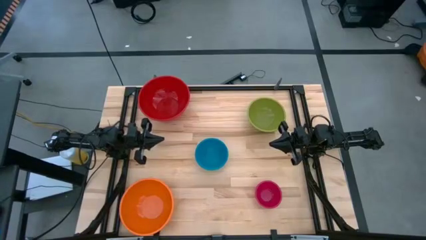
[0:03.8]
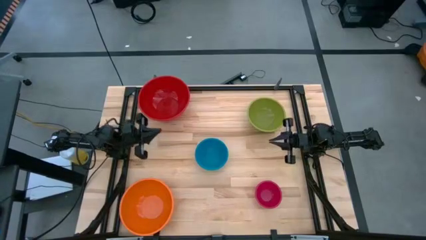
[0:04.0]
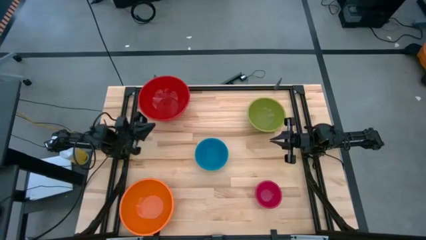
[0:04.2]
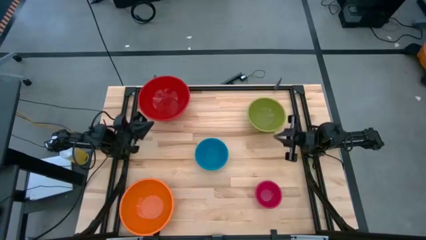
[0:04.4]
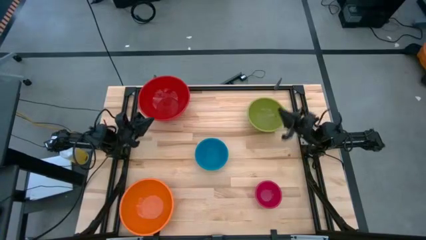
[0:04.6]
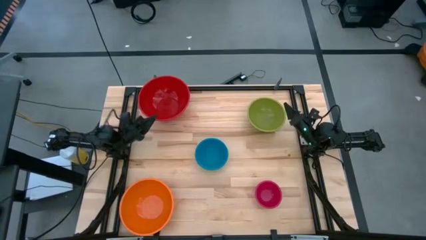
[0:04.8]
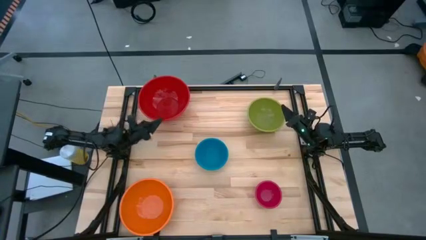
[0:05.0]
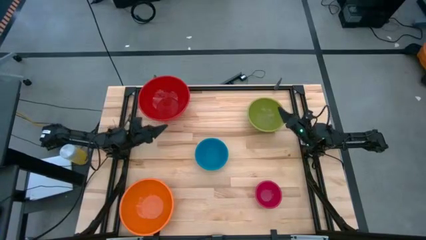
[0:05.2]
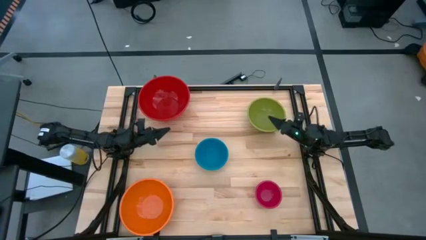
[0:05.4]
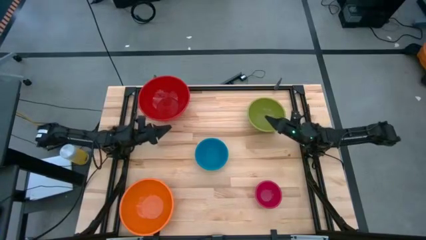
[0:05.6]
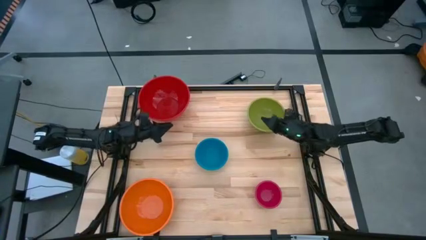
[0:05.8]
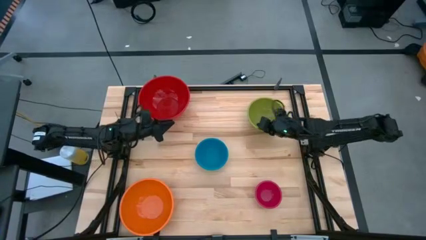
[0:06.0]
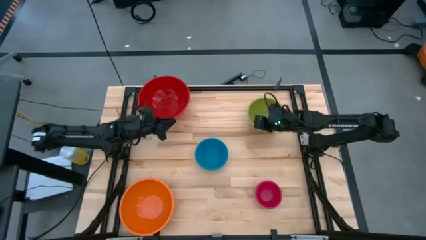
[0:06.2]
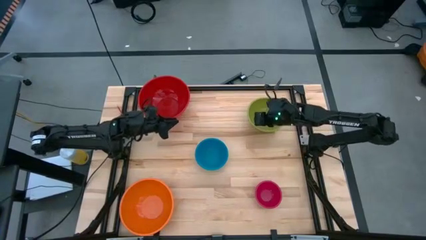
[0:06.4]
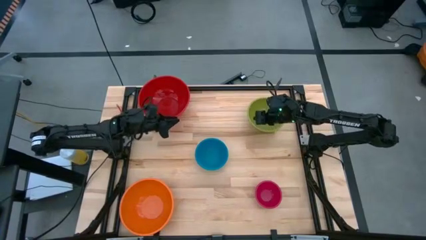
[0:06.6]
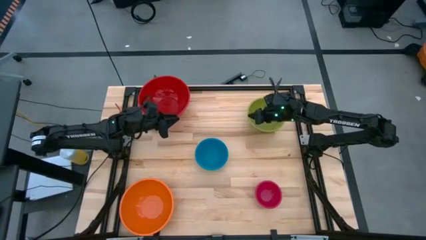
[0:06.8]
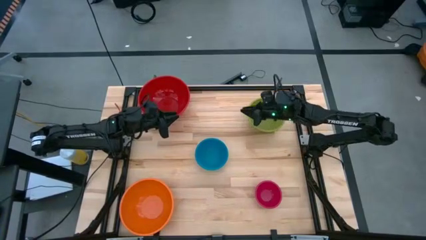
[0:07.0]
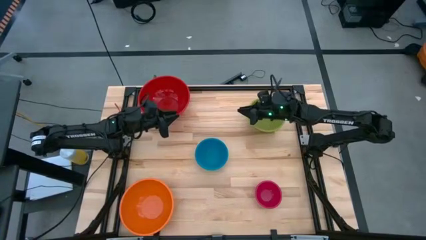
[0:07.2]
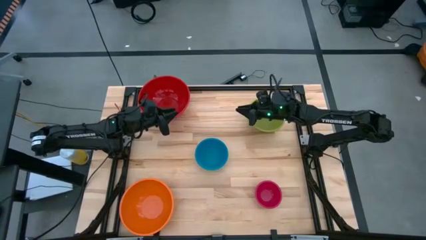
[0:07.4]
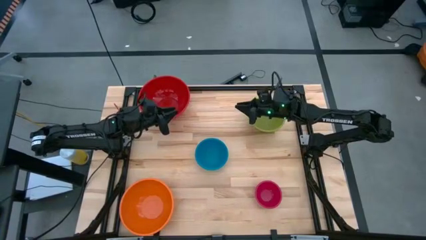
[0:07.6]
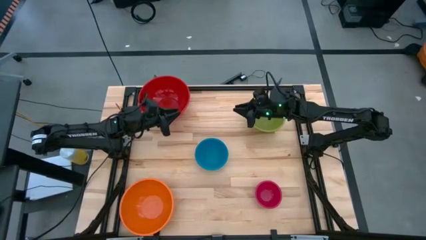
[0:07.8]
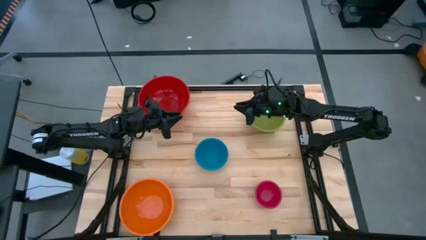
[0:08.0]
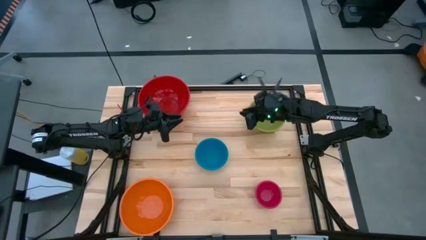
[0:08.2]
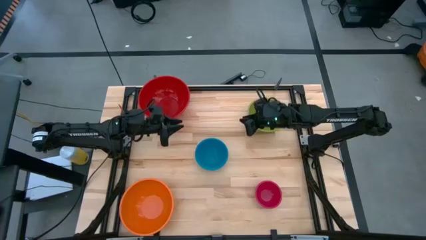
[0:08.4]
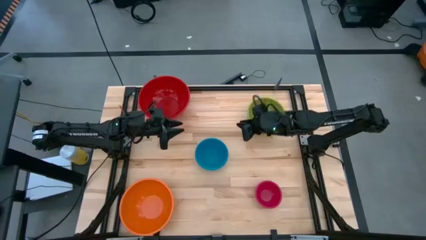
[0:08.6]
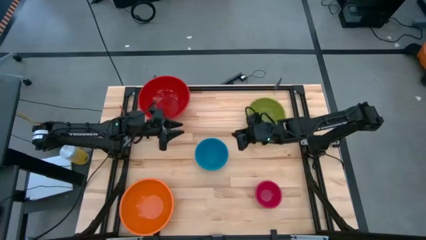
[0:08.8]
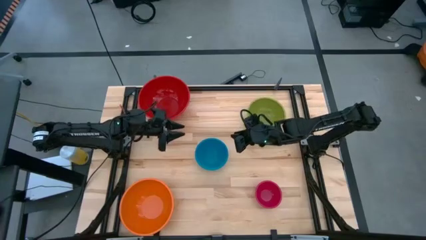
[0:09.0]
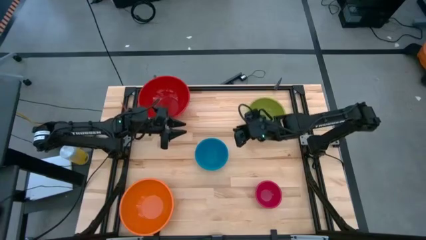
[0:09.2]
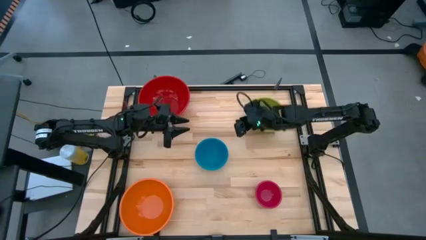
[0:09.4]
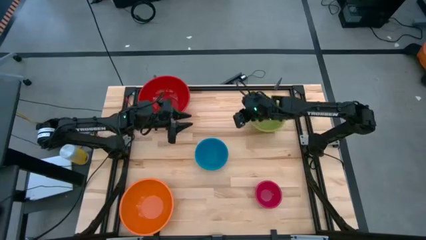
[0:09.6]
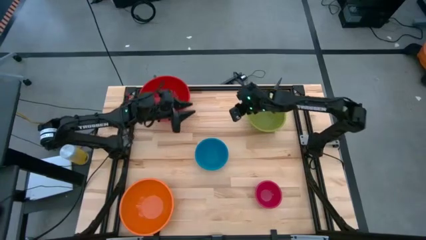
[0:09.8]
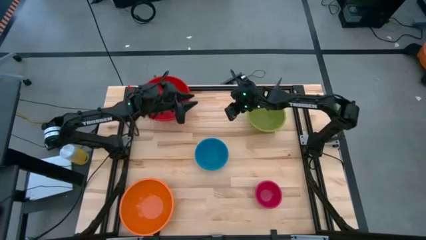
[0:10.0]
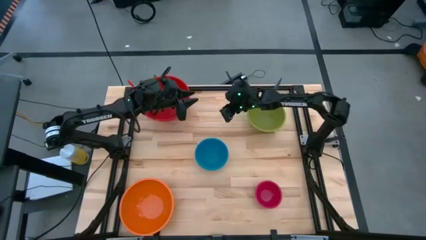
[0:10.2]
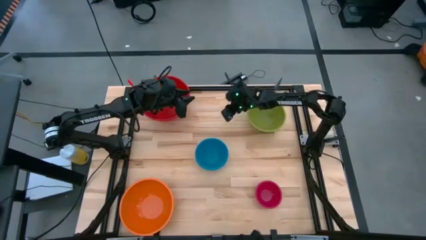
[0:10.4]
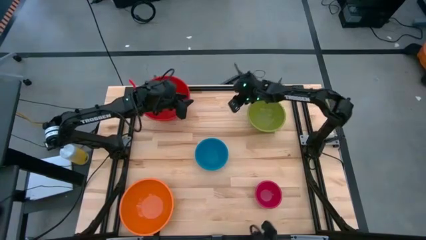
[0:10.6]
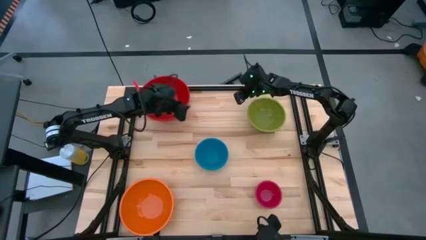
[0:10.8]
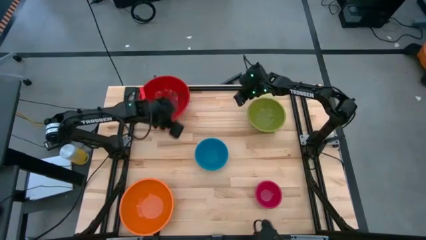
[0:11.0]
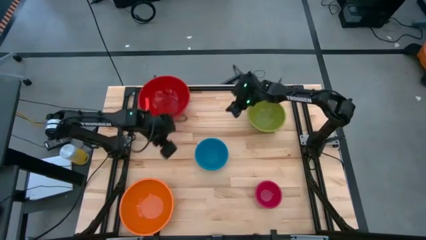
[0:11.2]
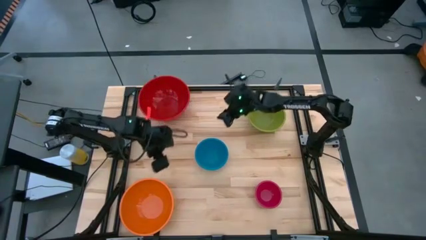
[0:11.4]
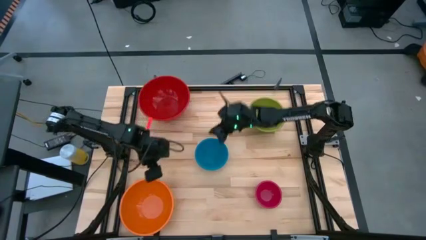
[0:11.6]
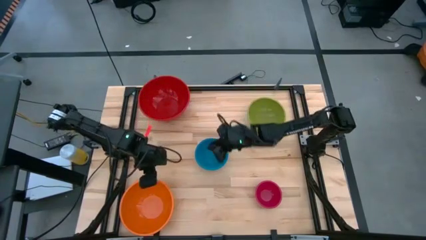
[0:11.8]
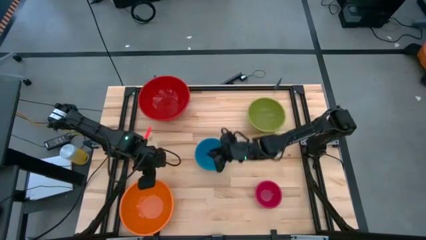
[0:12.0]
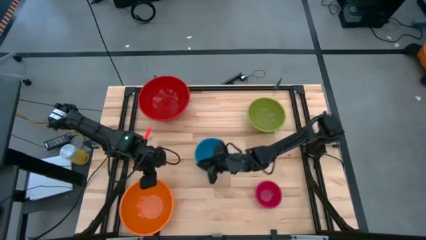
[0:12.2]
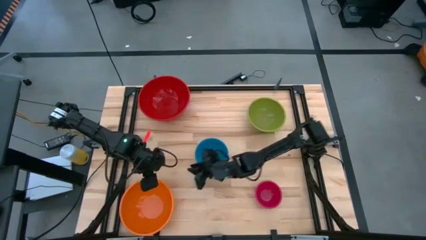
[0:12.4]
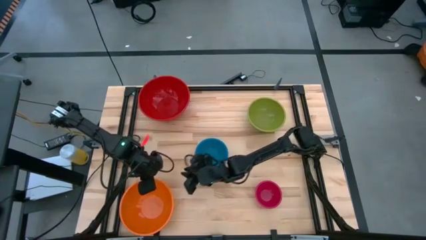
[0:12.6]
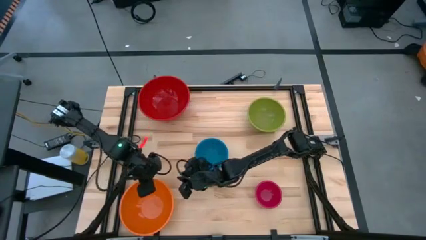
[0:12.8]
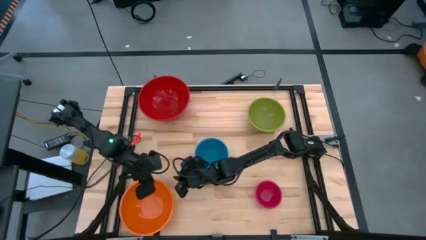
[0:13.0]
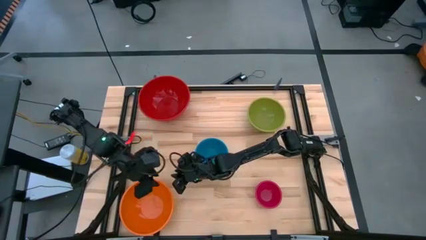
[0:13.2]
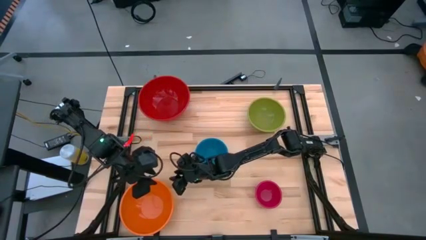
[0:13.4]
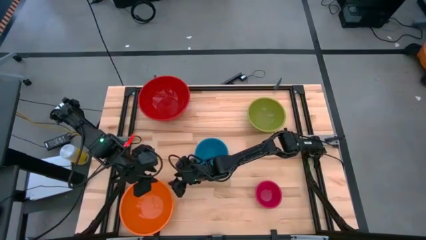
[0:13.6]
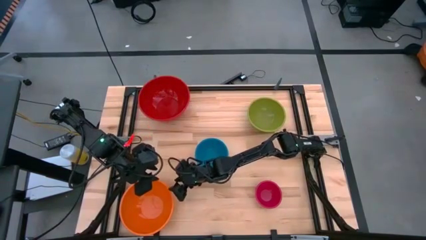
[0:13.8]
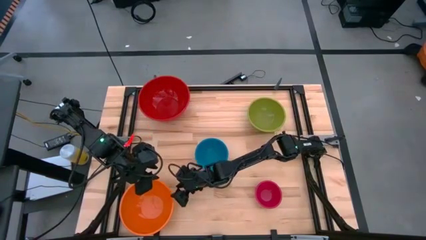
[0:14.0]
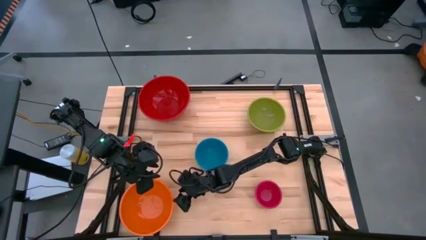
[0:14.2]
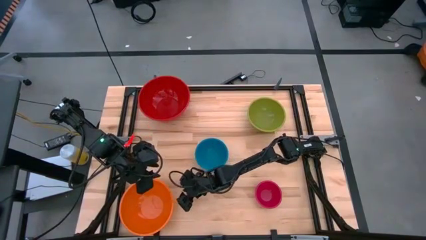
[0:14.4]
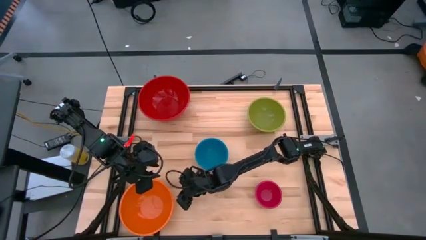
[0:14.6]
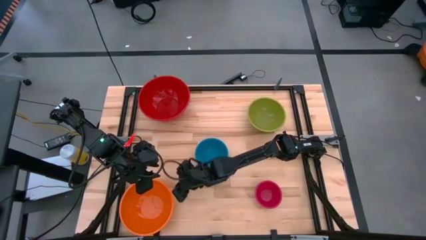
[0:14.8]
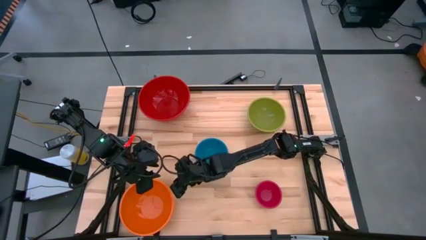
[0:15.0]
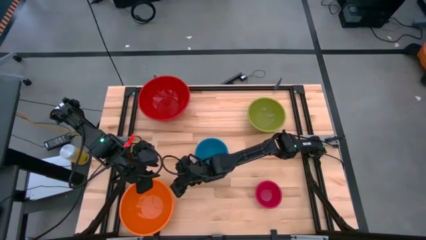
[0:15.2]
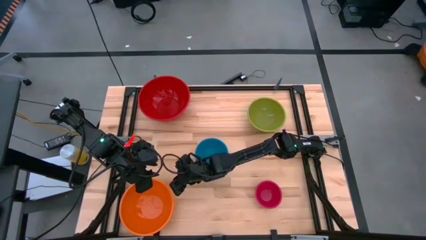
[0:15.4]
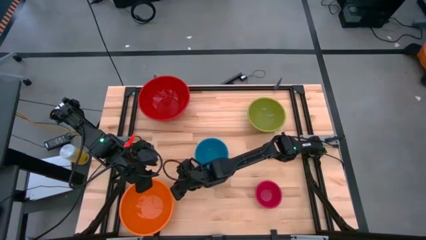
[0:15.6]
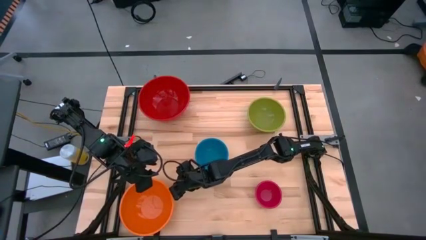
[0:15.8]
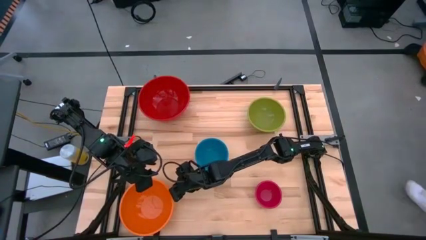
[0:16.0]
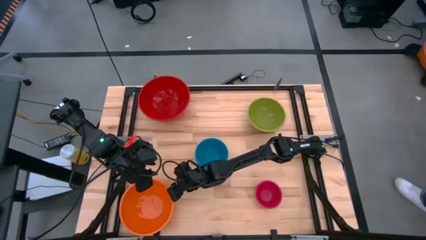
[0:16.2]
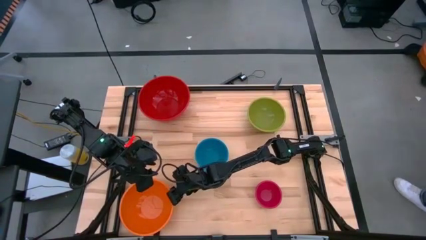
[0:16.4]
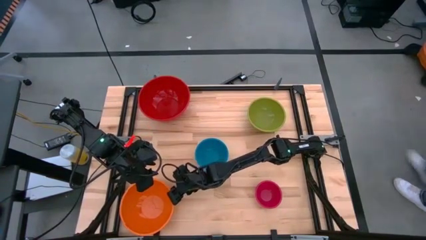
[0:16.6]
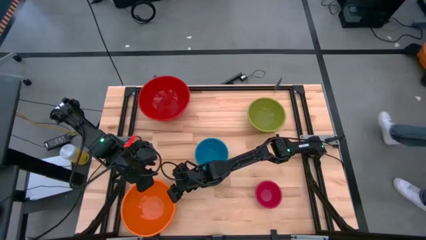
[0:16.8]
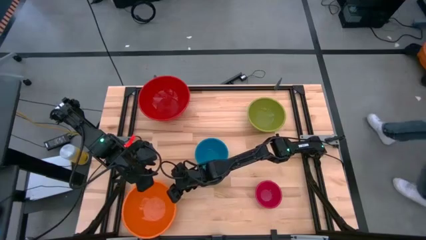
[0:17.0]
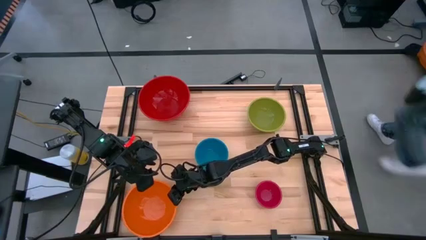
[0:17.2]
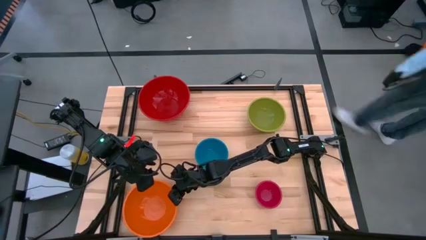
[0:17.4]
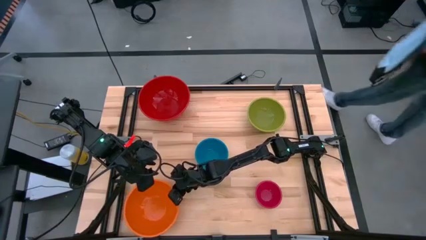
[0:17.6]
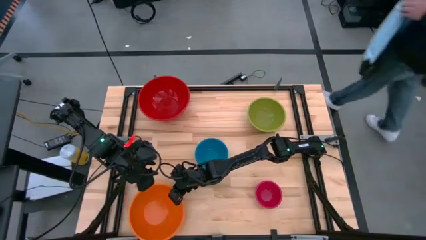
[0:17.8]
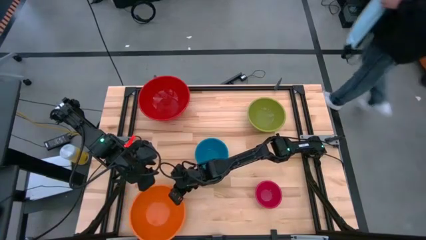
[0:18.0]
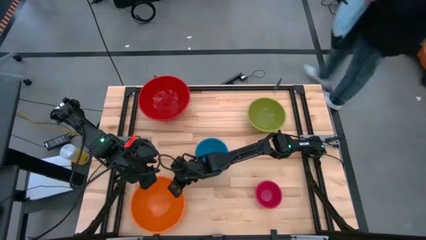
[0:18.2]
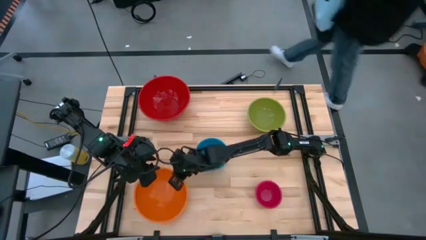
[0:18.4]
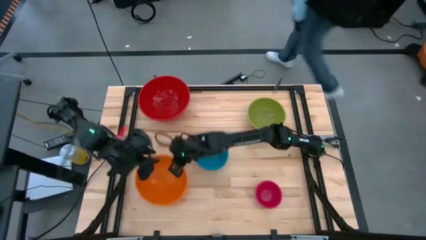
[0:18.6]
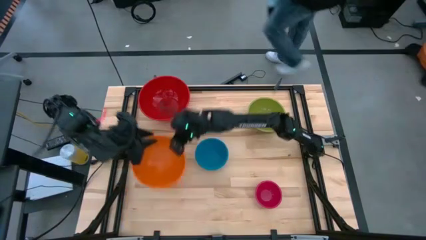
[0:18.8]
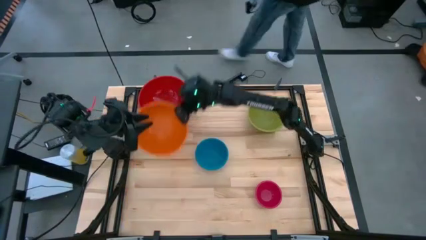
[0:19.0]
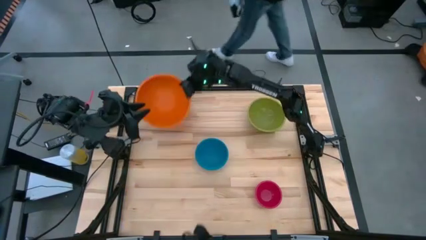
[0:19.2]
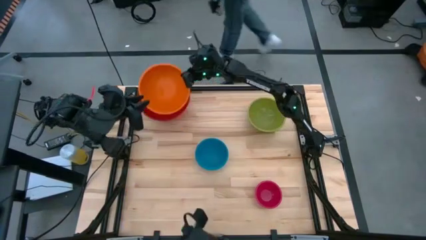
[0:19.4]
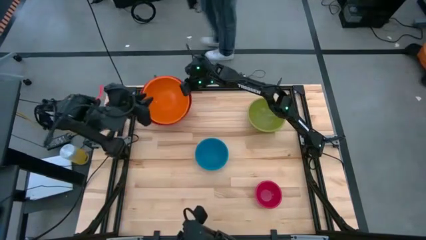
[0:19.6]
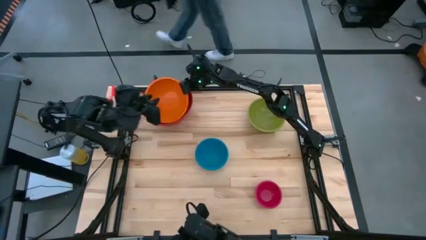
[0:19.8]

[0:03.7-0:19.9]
Stack the orange bowl into the red bowl
